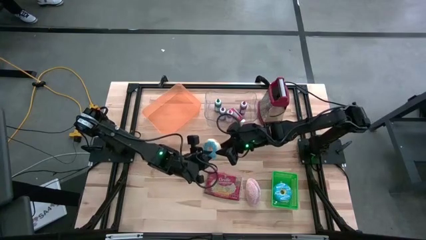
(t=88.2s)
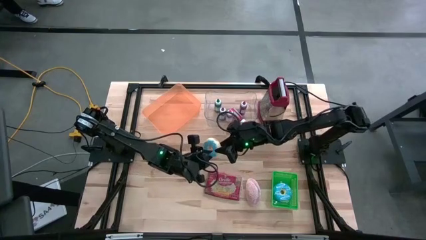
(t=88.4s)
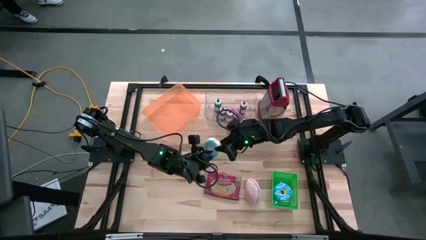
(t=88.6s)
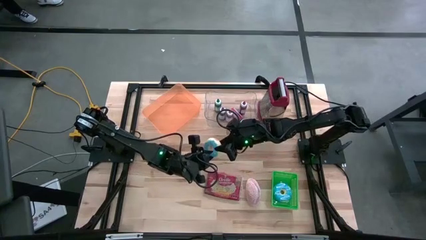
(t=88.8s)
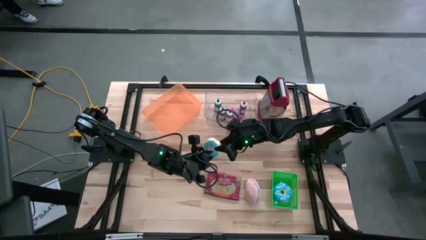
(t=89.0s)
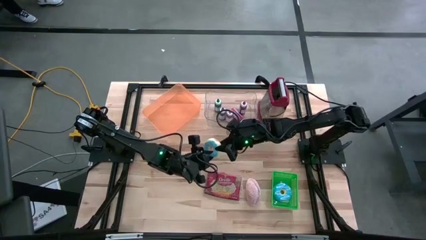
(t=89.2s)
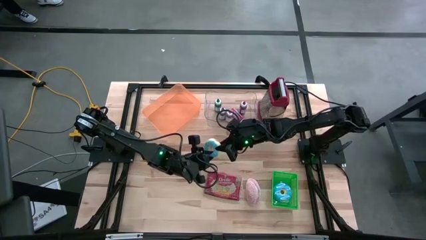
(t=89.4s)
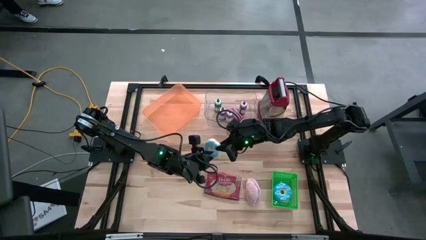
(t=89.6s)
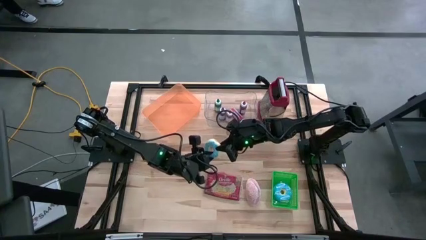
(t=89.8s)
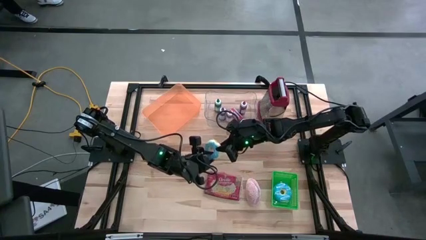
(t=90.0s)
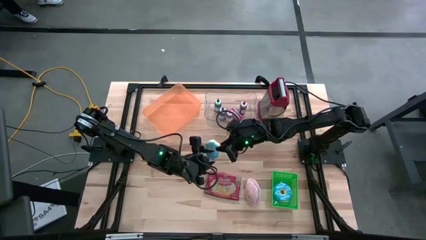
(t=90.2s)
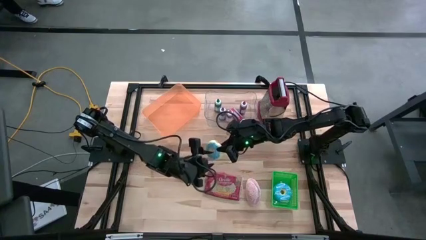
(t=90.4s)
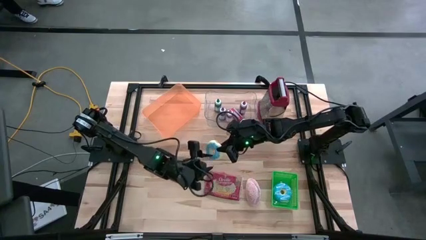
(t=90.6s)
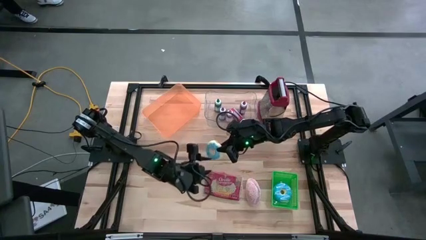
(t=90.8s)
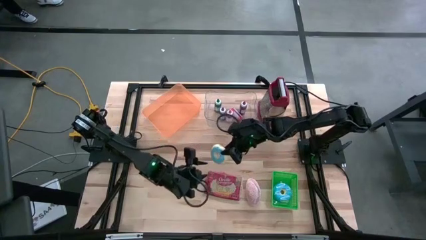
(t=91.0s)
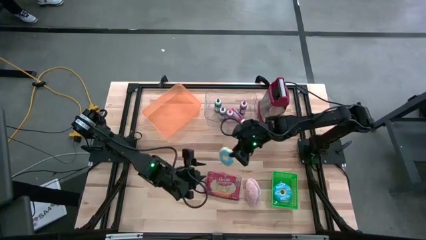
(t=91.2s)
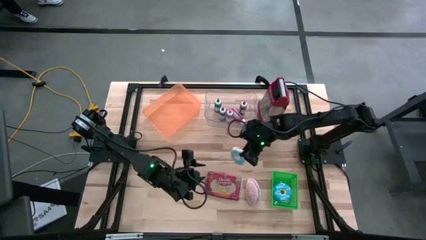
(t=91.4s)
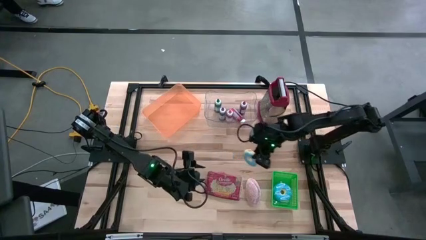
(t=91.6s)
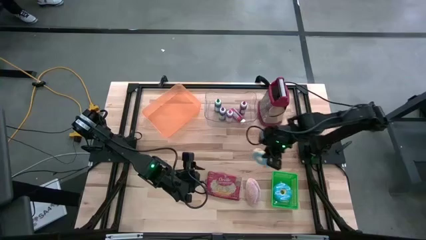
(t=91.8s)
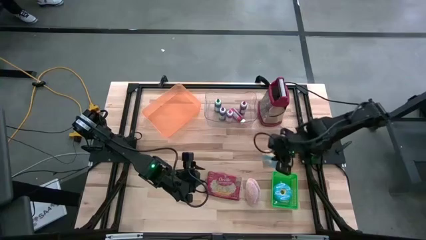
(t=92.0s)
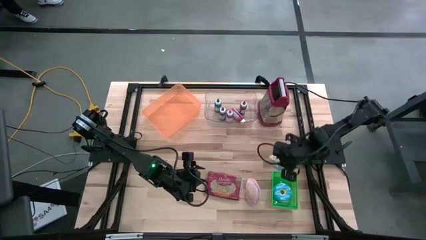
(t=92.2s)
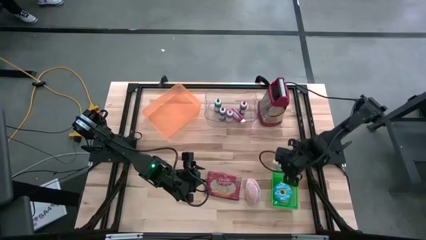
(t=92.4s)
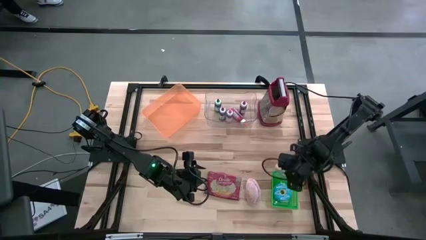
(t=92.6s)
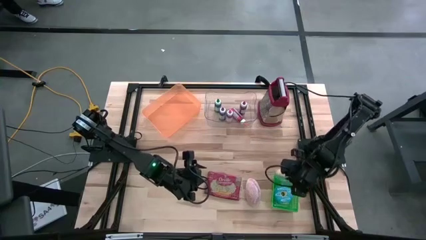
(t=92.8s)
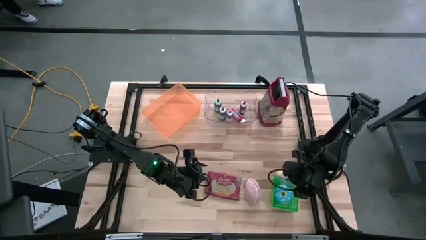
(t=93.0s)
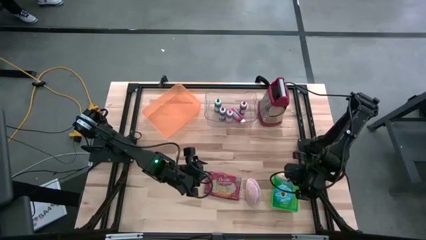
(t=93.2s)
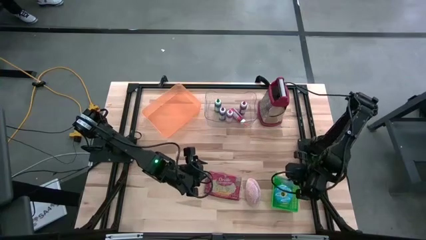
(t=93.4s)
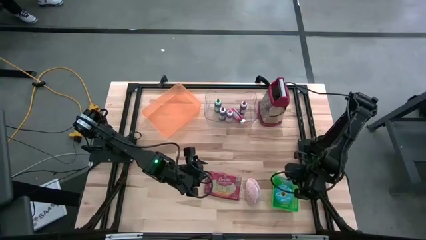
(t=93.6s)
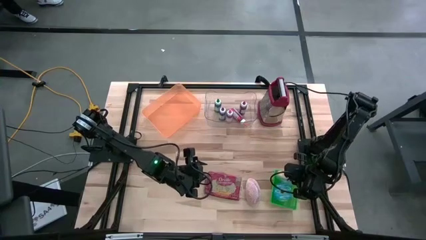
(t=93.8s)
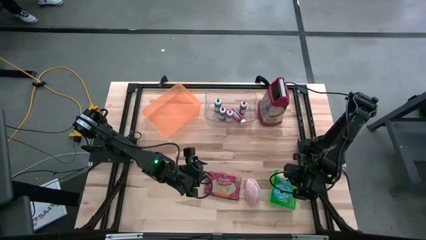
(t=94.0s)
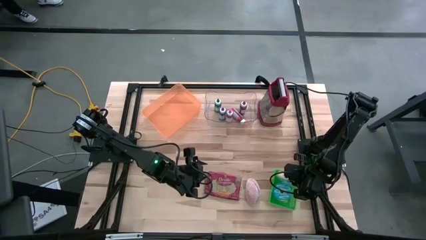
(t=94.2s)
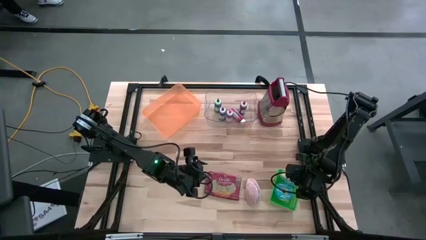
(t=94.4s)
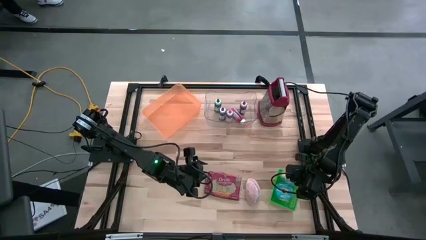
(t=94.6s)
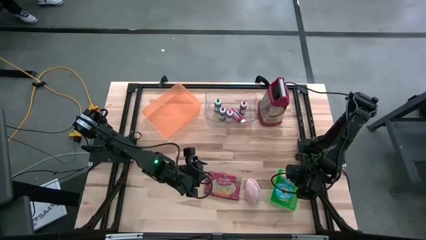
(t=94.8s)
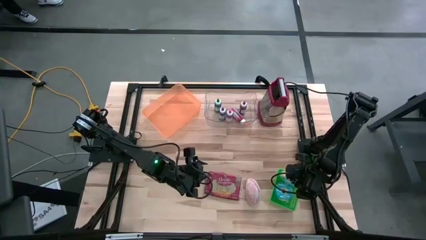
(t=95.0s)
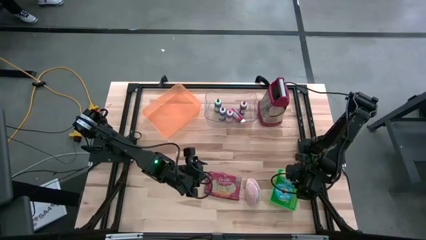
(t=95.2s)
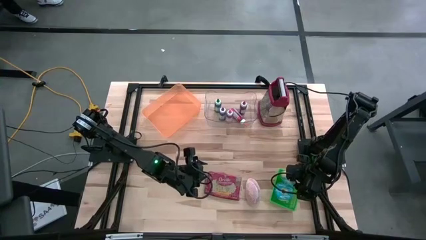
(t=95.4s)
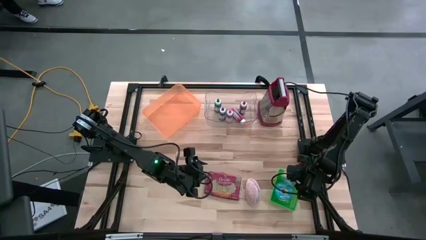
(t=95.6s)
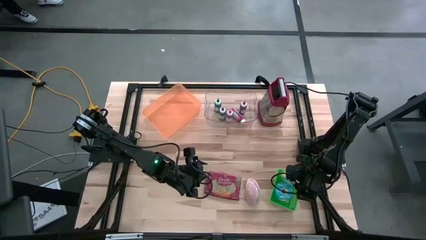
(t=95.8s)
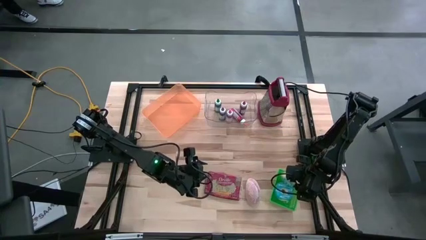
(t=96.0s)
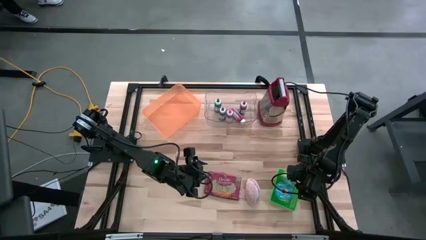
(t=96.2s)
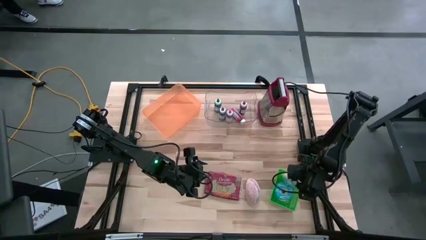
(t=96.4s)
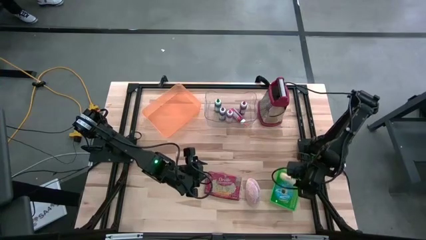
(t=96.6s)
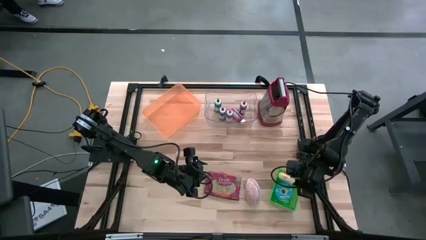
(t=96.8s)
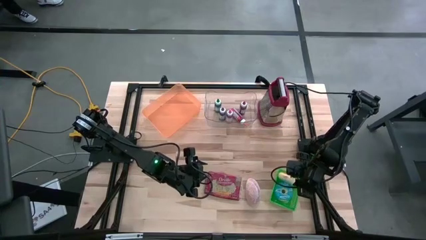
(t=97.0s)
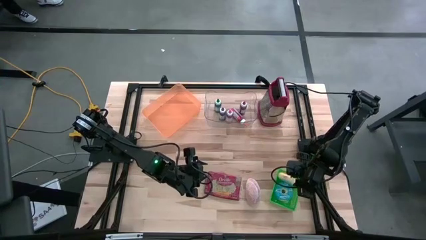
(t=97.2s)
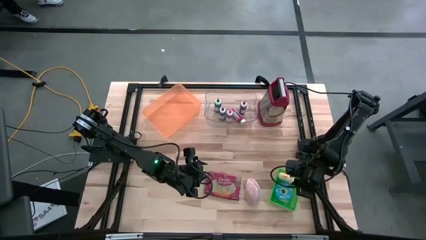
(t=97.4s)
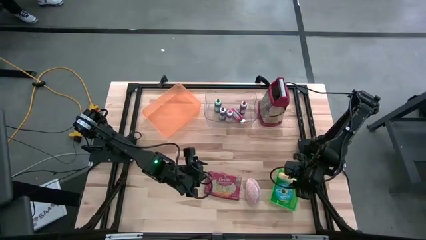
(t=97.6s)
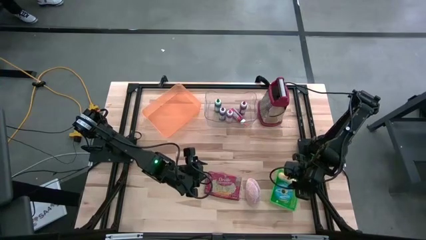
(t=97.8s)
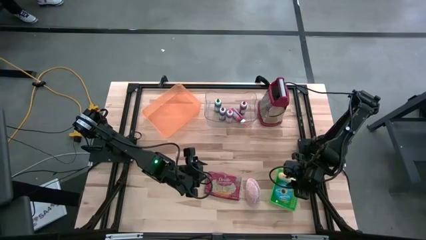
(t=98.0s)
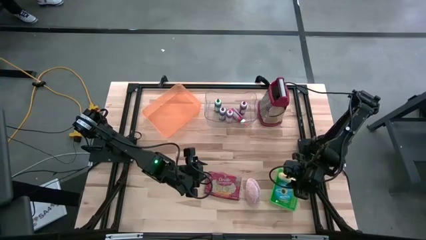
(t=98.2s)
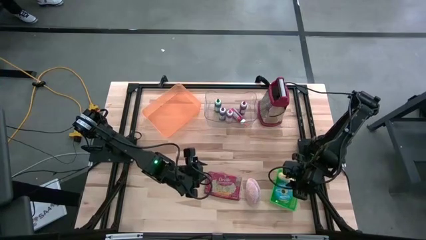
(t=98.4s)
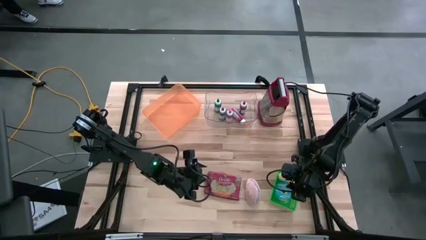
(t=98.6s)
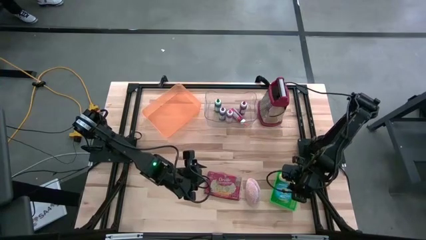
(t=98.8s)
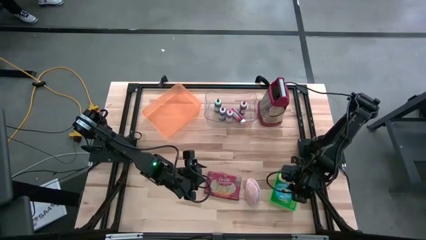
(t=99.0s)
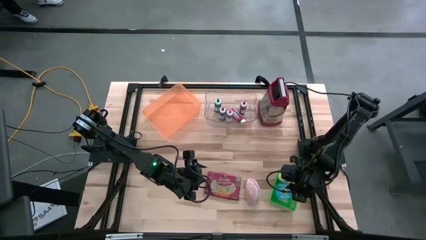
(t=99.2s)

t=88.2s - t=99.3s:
Put the light blue donut into the green bin
